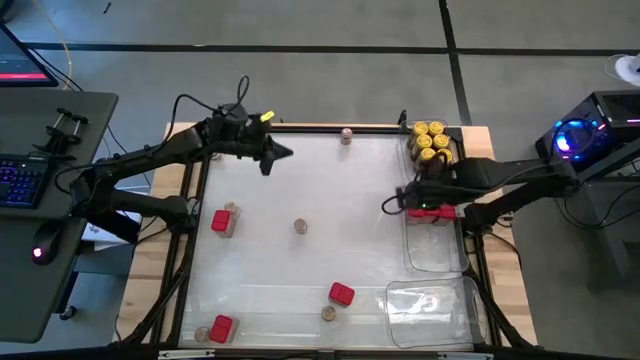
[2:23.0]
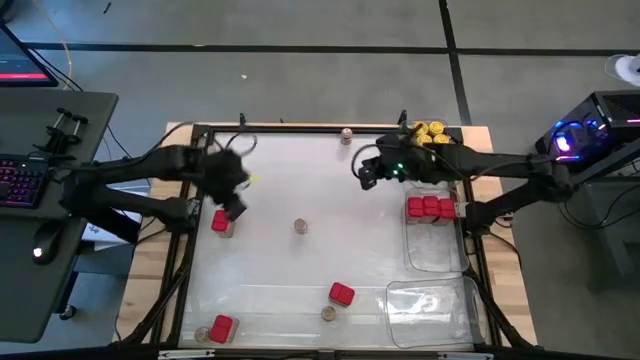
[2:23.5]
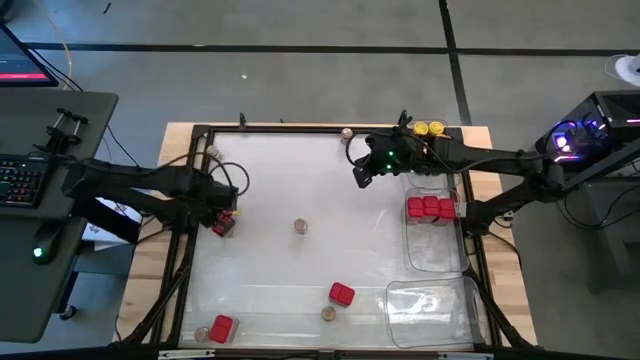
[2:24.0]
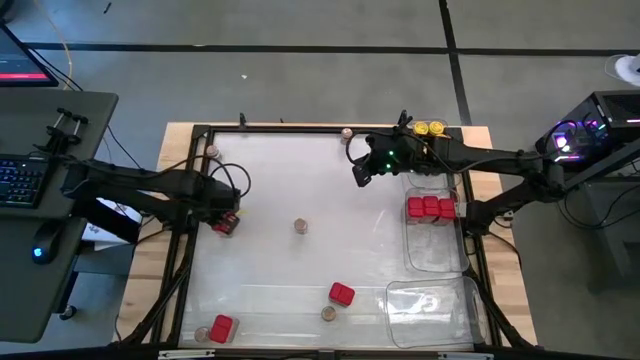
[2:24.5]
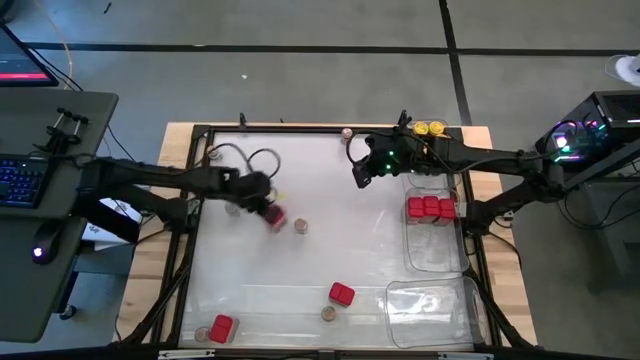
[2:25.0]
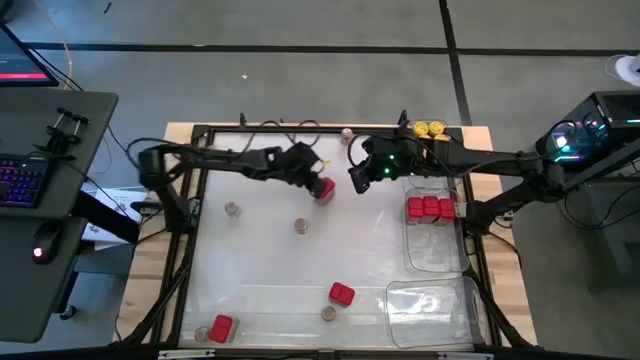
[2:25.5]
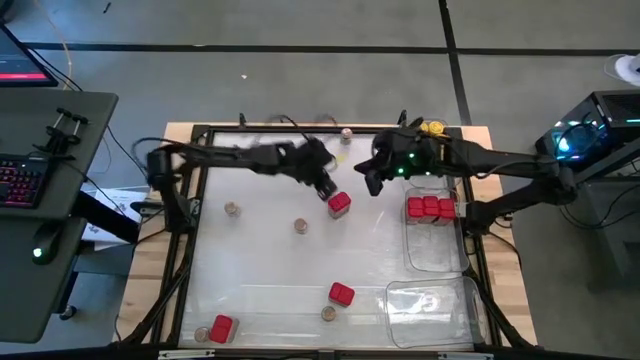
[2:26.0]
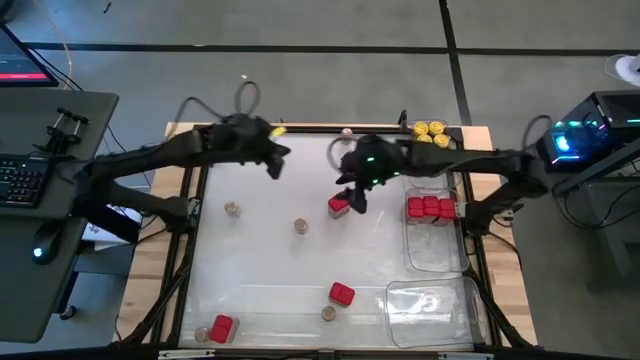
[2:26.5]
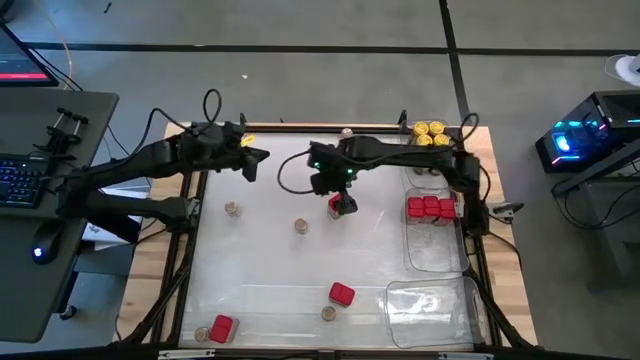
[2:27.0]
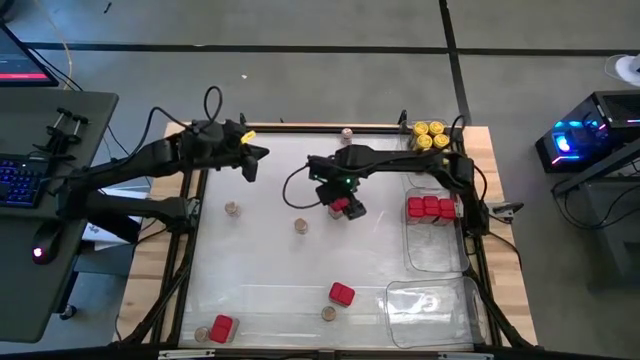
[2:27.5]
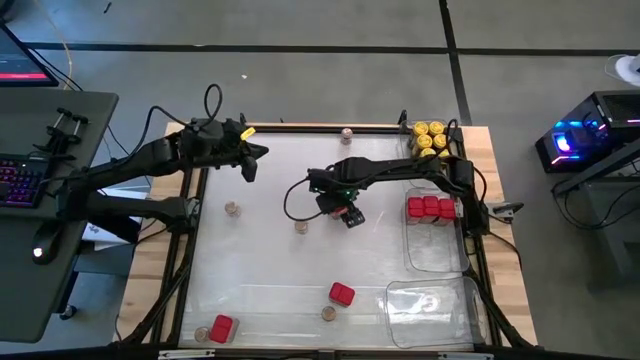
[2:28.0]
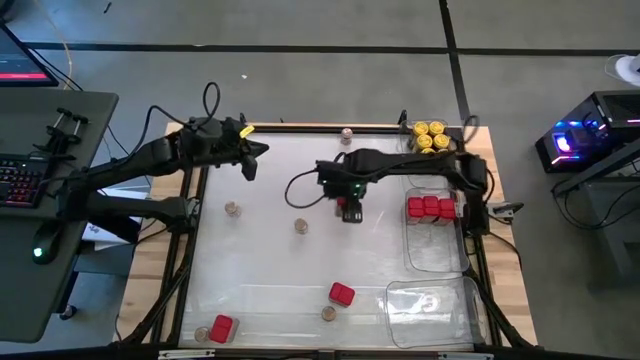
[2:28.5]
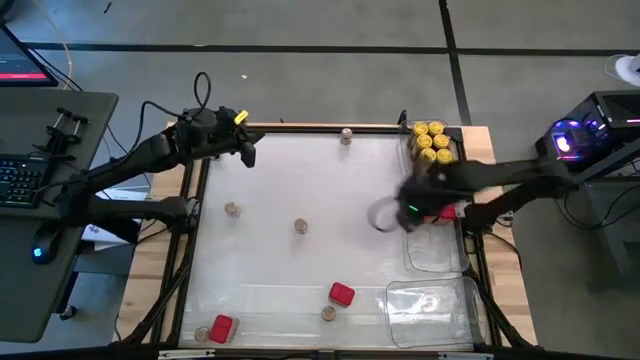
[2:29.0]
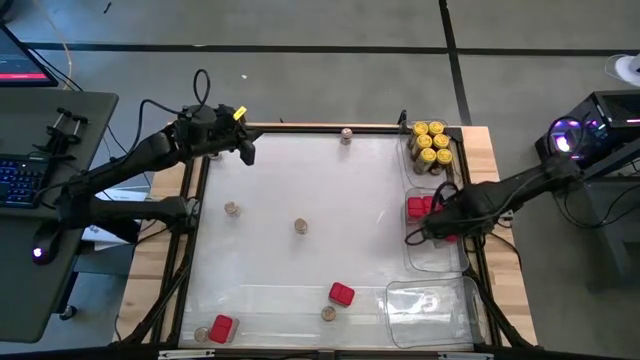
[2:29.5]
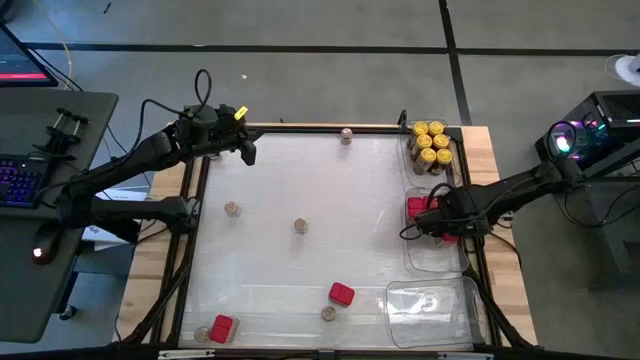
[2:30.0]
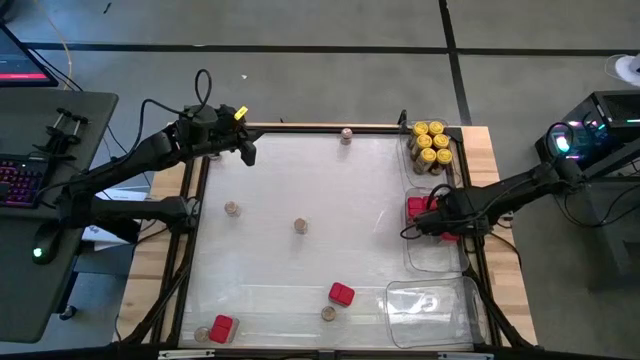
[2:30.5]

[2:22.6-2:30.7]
Task: Sort spices by type
Put the red seasoning can into the middle transparent bin

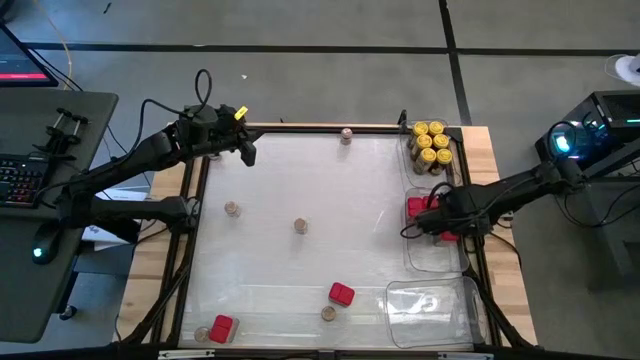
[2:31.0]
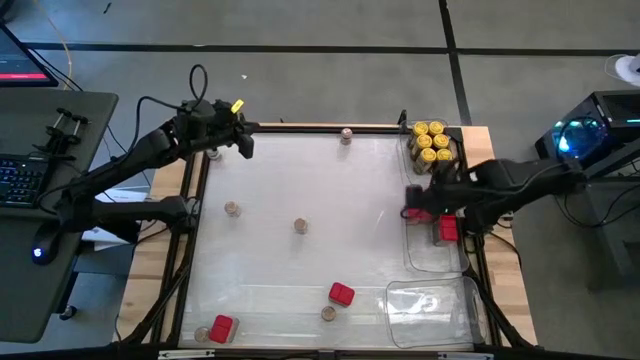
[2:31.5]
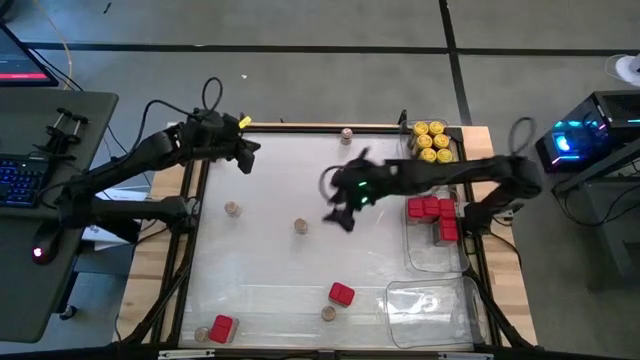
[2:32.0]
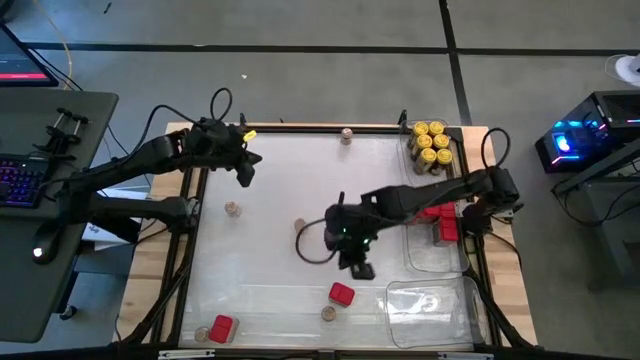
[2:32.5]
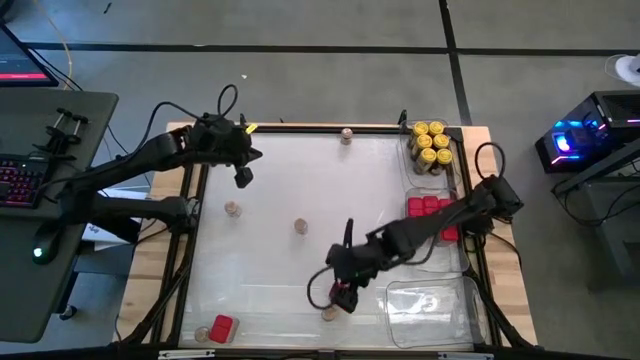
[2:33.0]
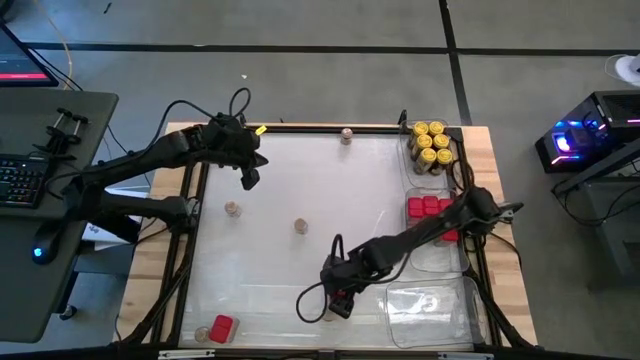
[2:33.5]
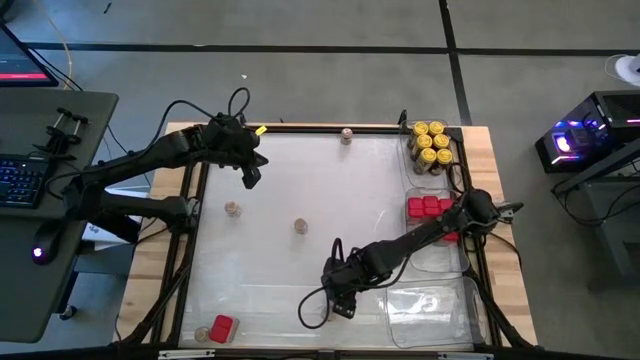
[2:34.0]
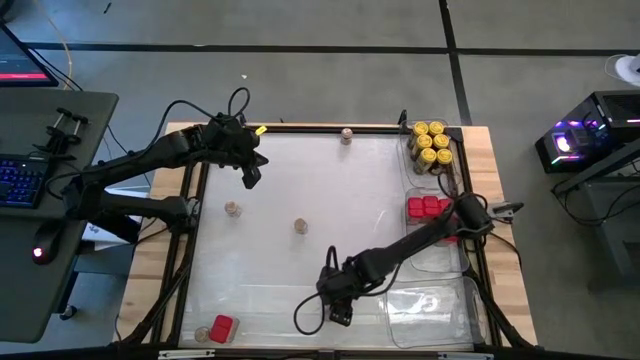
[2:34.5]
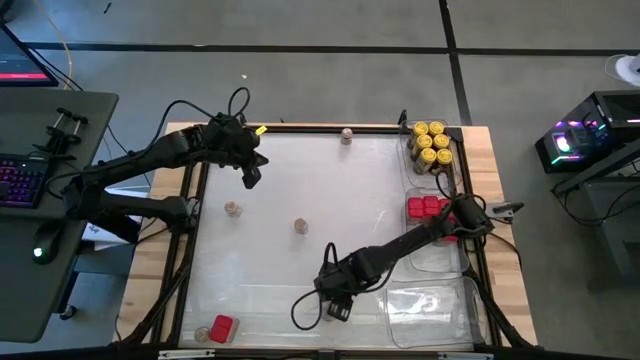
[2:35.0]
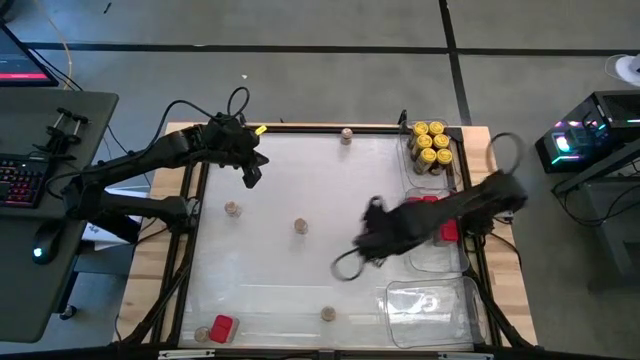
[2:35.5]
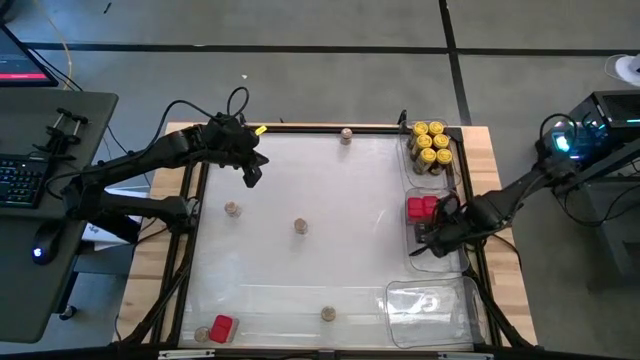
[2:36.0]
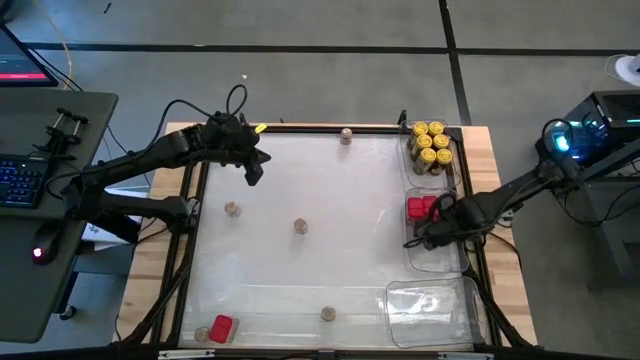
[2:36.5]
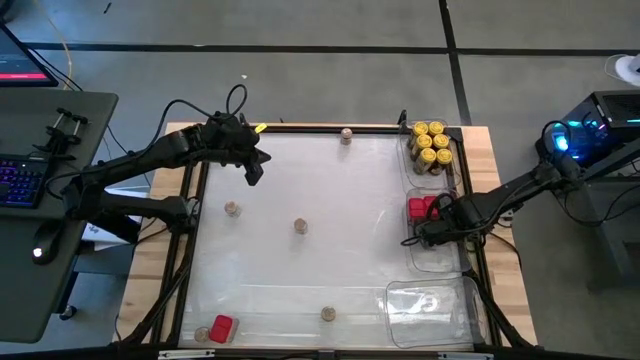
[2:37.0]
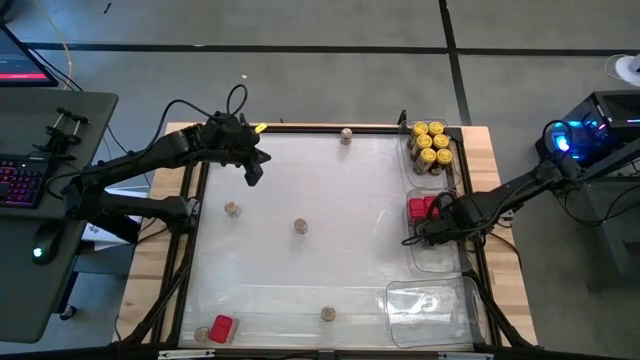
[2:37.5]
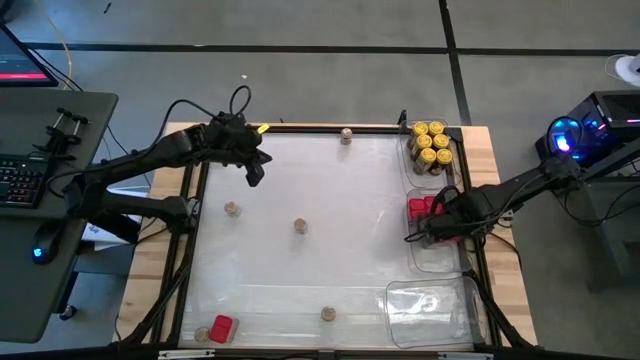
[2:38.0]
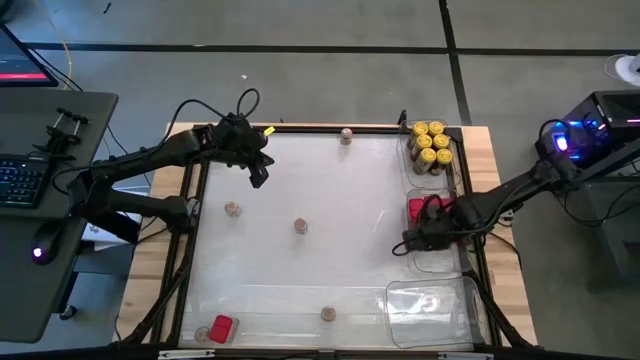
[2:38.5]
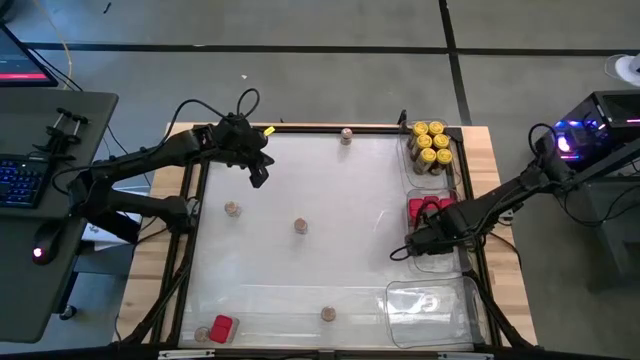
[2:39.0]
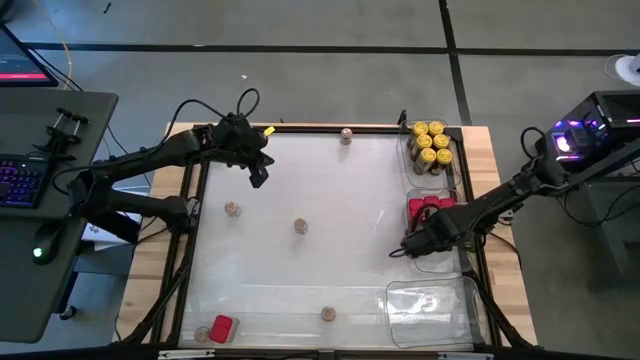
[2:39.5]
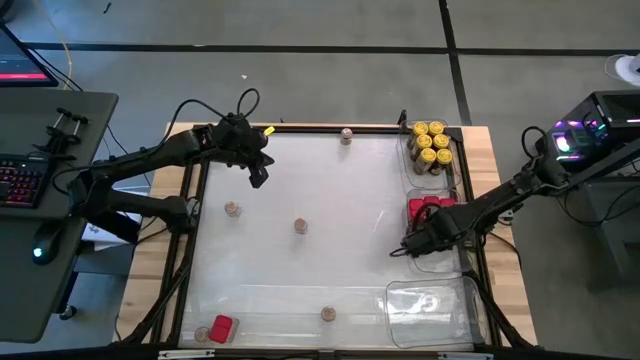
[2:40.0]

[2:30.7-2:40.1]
Put the red seasoning can into the middle transparent bin

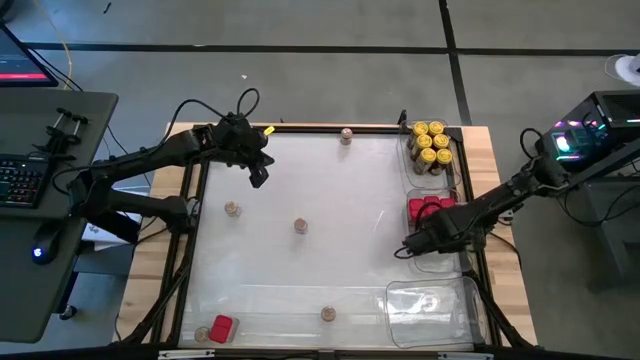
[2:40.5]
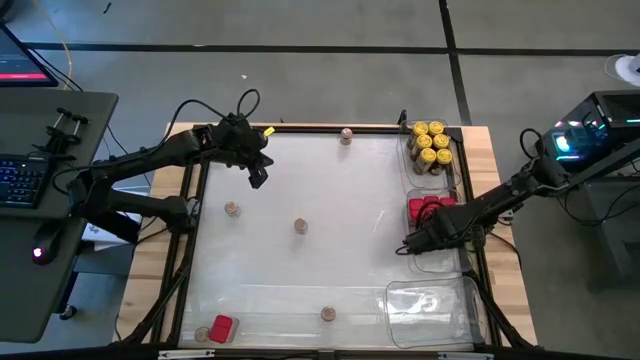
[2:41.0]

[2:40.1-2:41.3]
Adjust the red seasoning can in the middle transparent bin

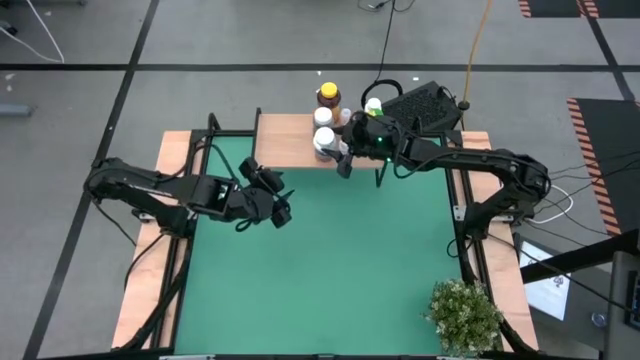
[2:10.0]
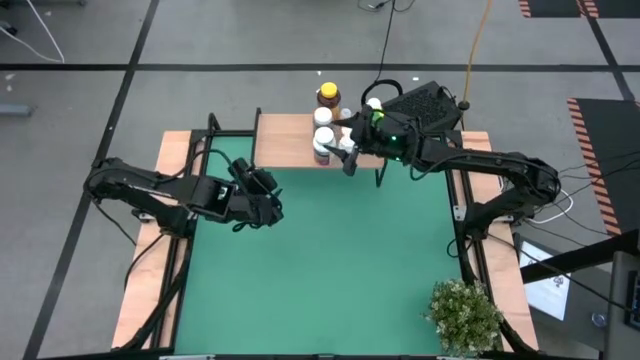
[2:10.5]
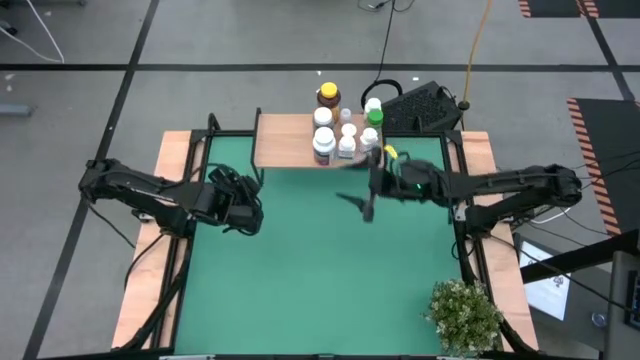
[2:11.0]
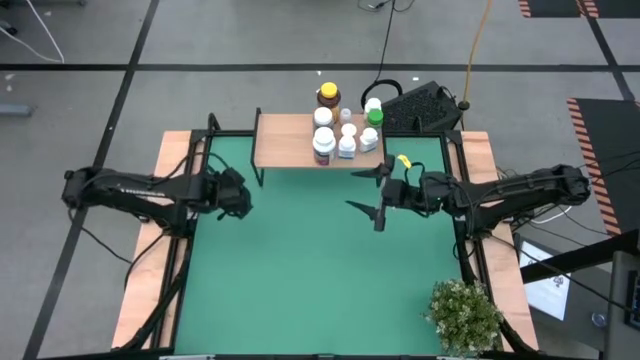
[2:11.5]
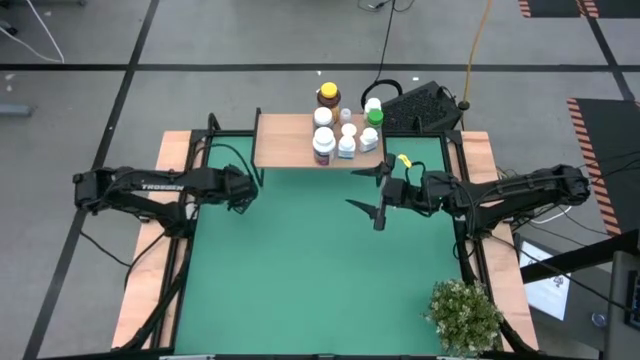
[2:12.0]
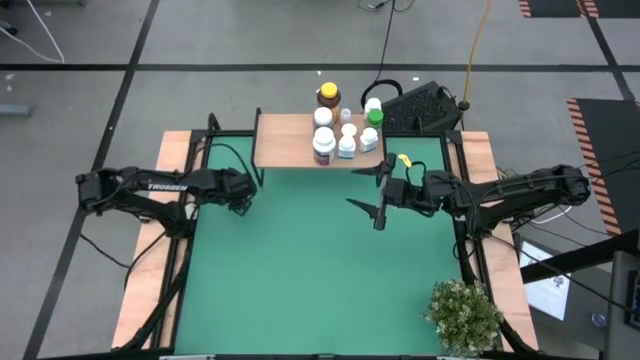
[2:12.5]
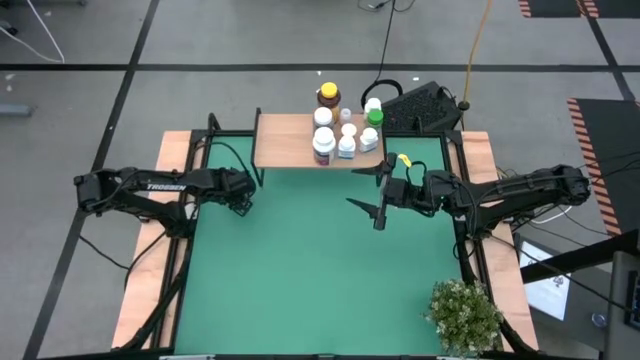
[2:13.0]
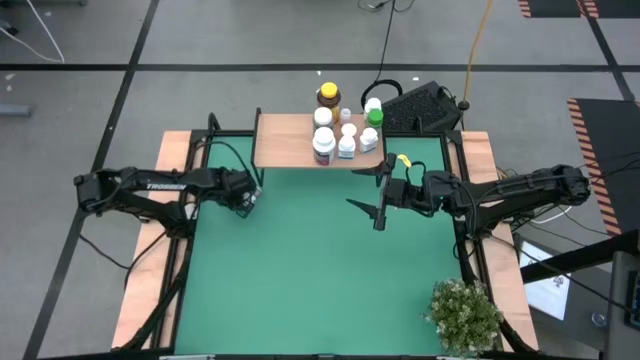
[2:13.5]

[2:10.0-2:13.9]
Task: Pick and place medicine bottles onto shelf by color
Put the small white medicine bottle on the shelf
